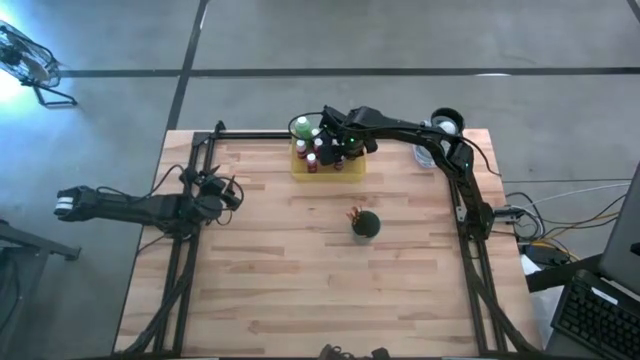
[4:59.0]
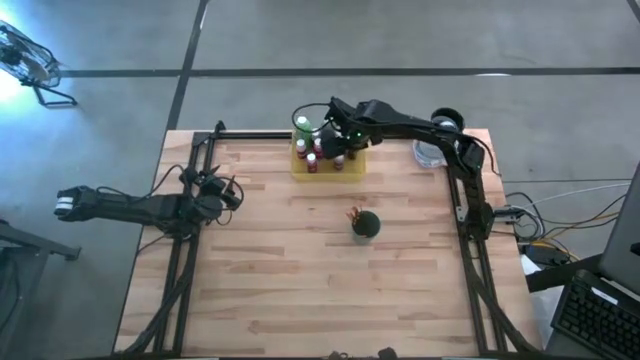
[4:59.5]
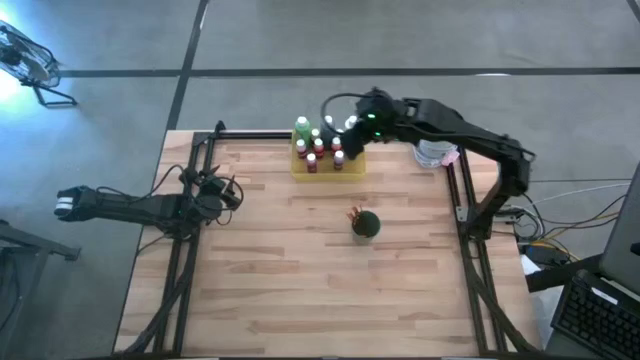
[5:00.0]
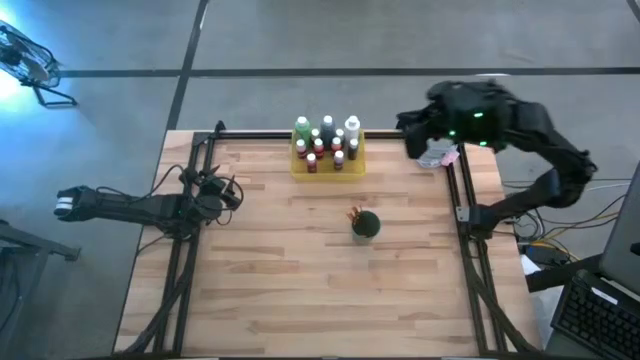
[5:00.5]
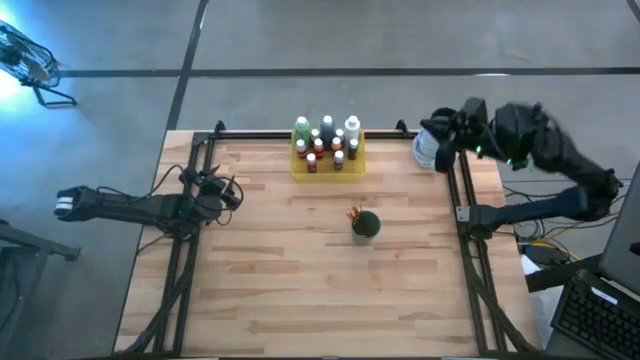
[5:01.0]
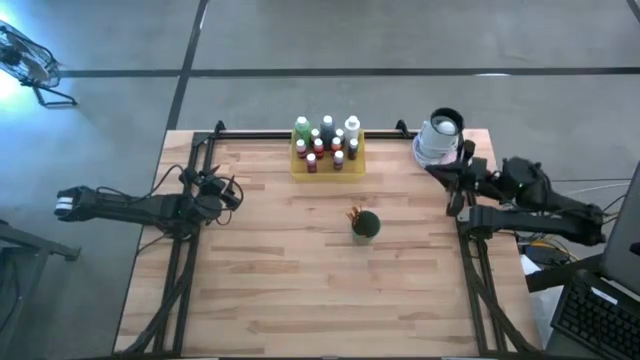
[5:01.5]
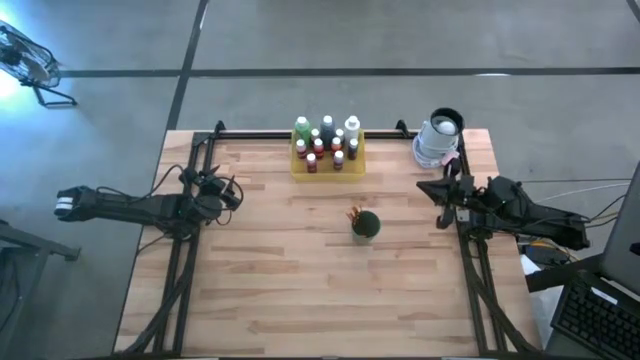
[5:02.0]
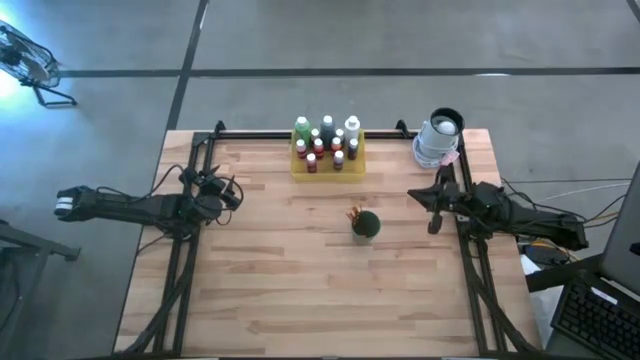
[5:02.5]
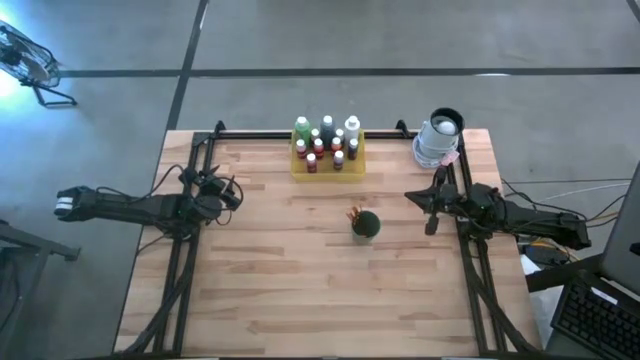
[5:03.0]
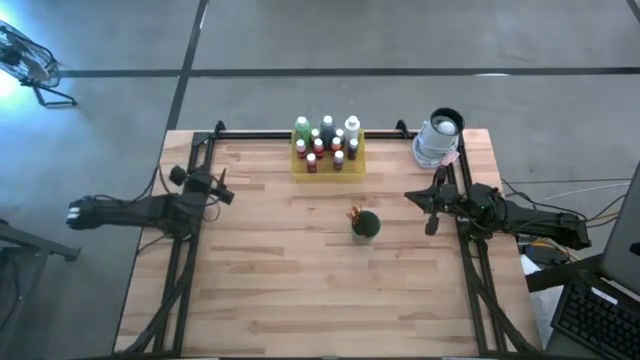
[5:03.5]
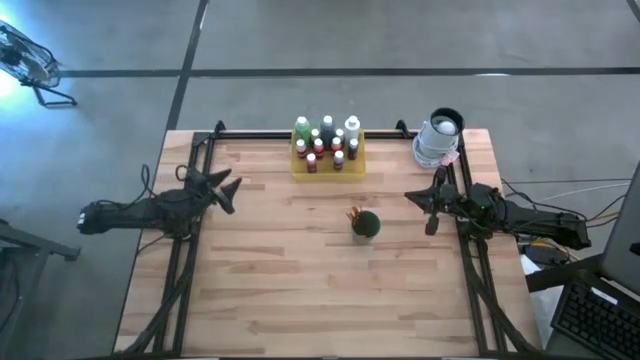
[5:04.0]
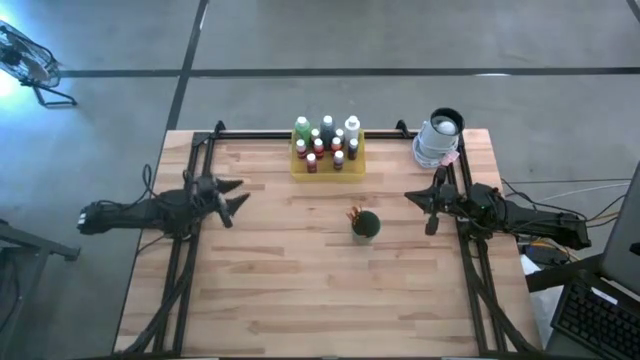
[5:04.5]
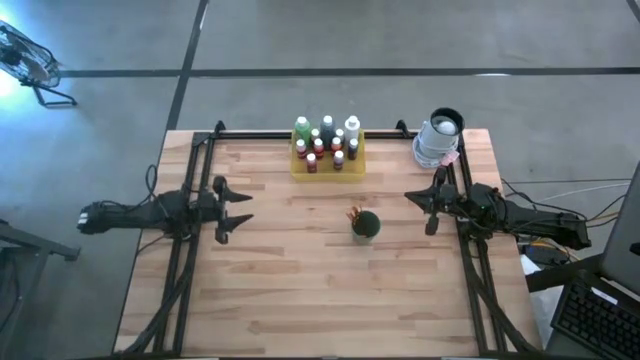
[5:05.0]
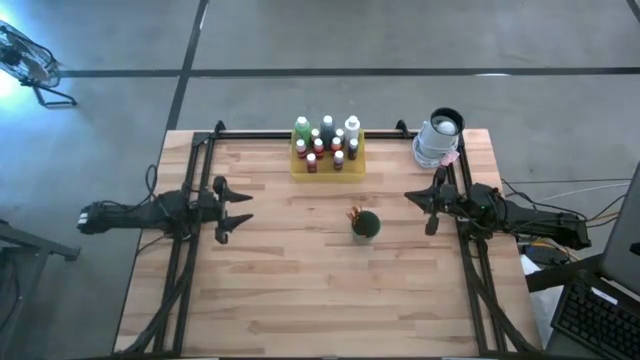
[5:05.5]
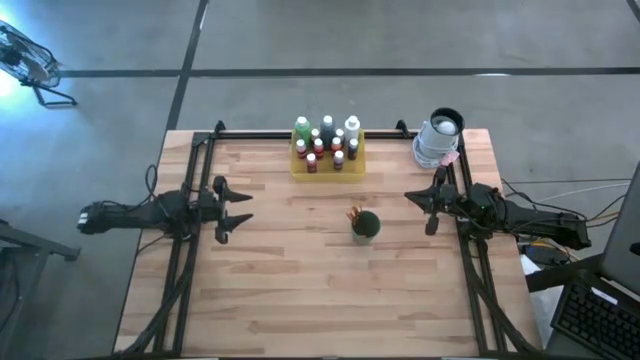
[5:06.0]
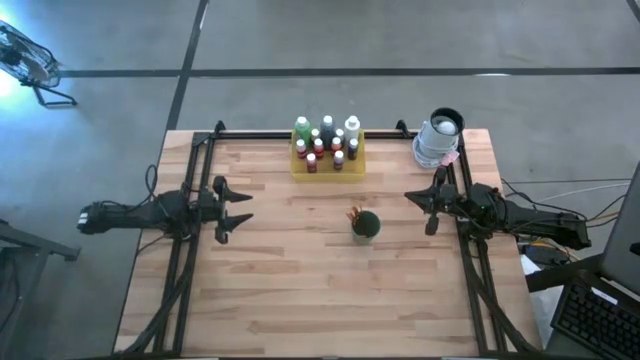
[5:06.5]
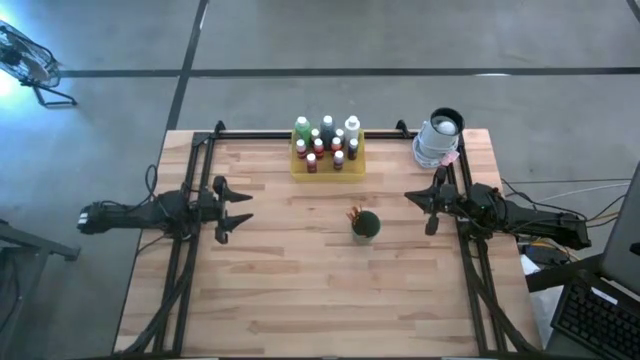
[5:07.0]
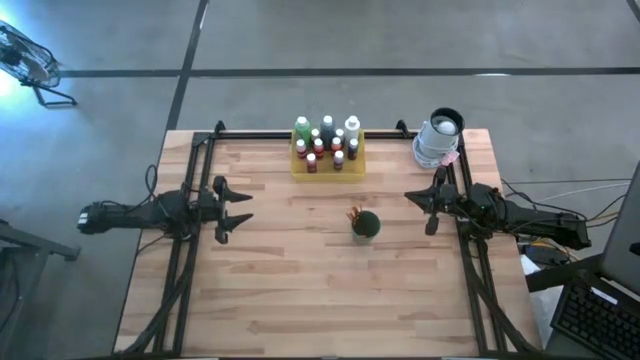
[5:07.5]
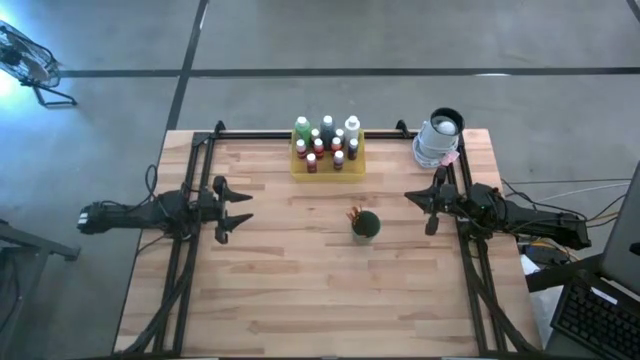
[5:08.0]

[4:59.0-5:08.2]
Task: Pick & Place Paint Supplies
Return to Home Position

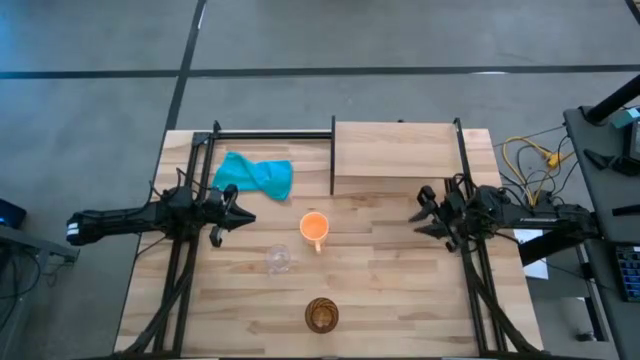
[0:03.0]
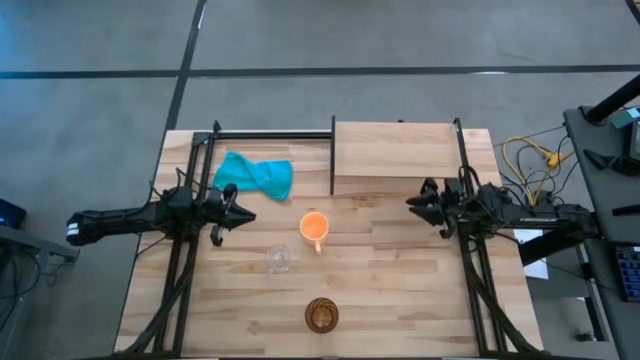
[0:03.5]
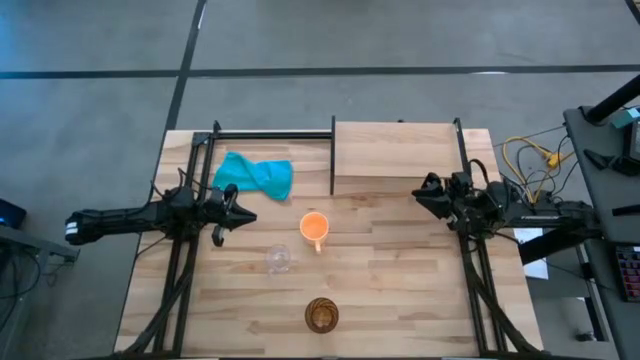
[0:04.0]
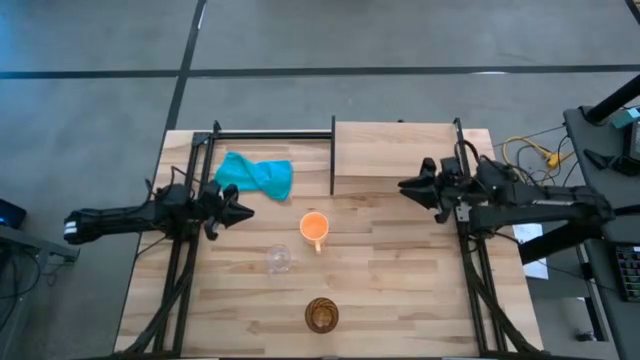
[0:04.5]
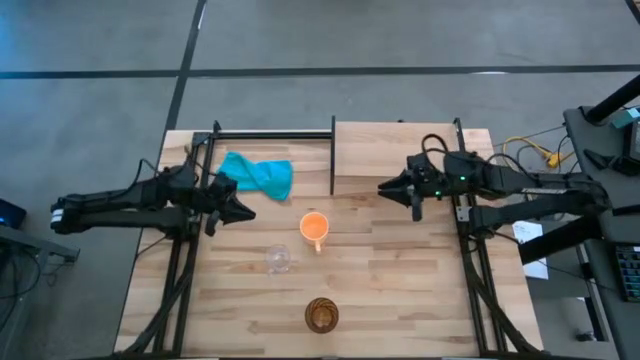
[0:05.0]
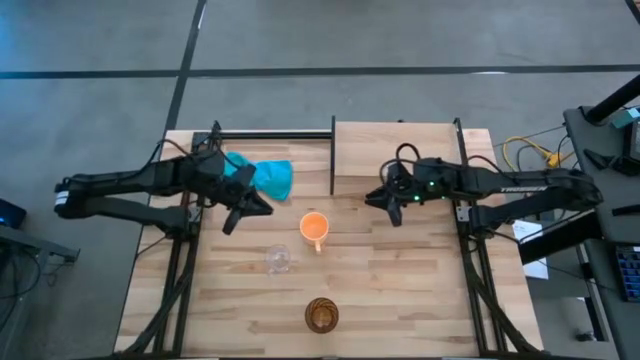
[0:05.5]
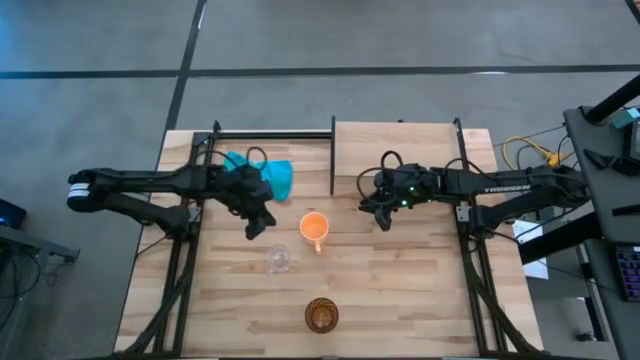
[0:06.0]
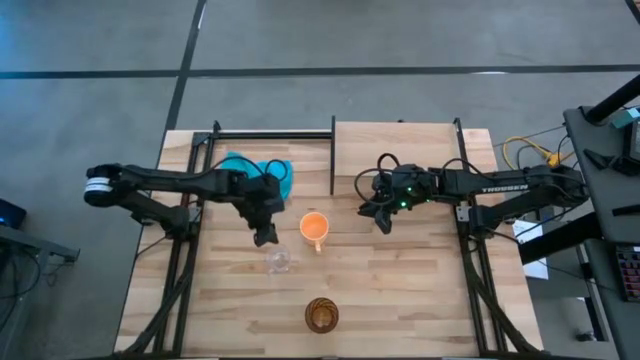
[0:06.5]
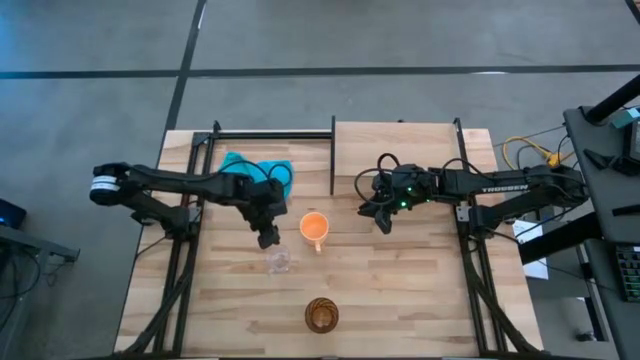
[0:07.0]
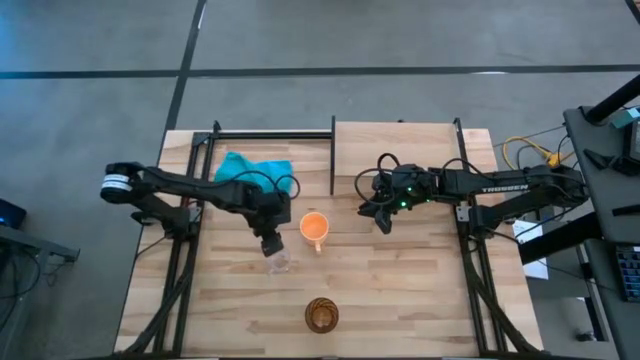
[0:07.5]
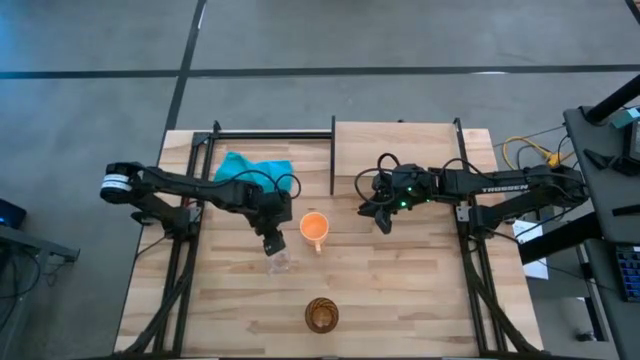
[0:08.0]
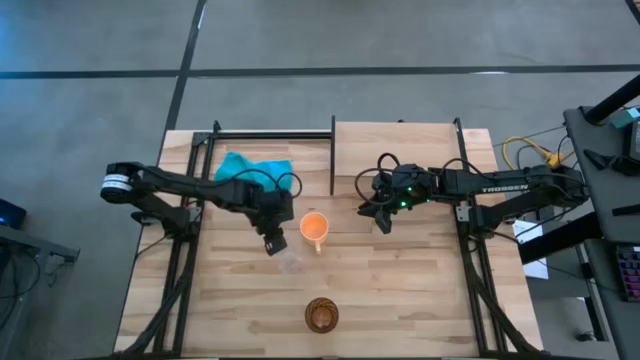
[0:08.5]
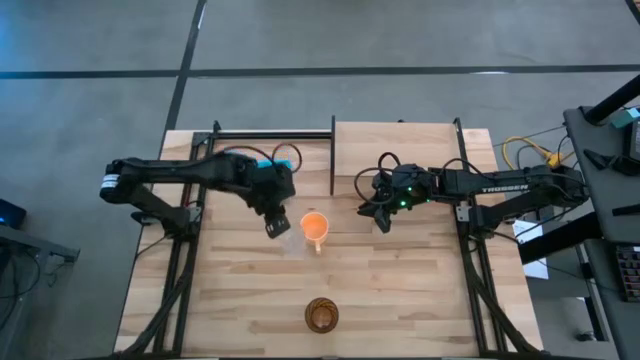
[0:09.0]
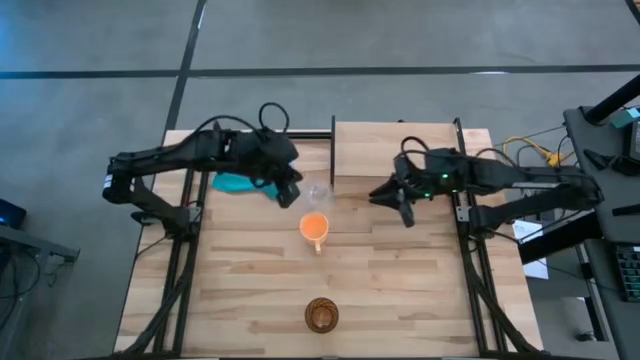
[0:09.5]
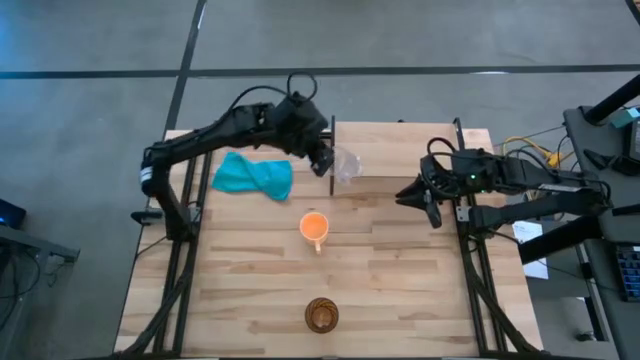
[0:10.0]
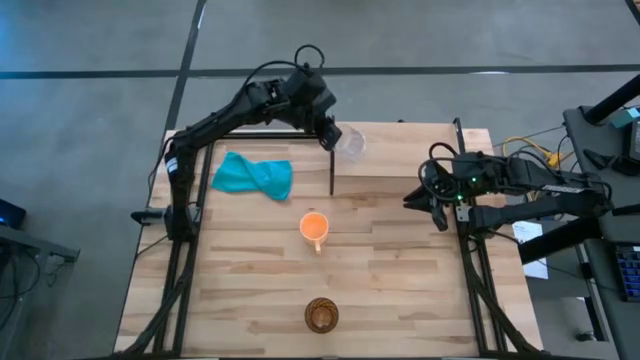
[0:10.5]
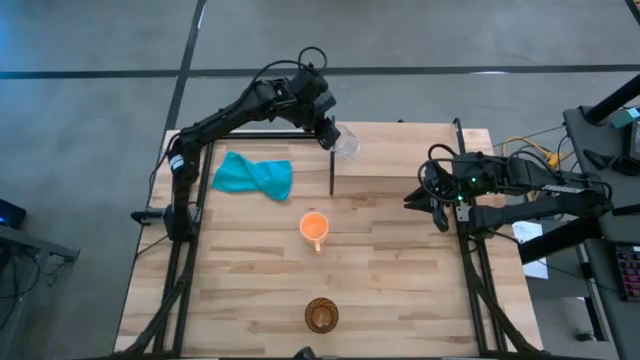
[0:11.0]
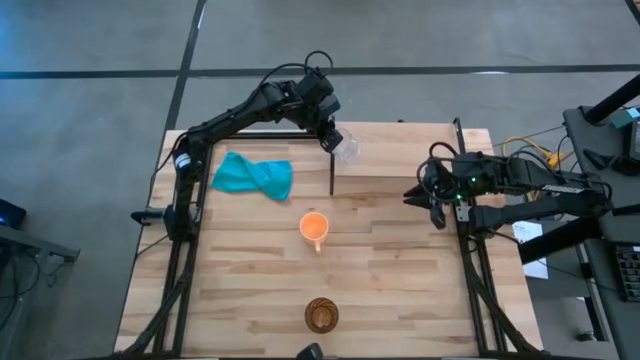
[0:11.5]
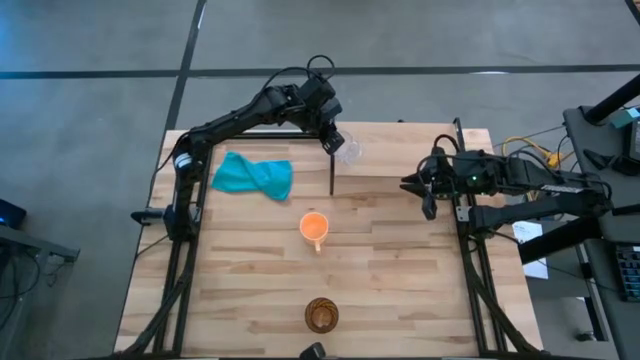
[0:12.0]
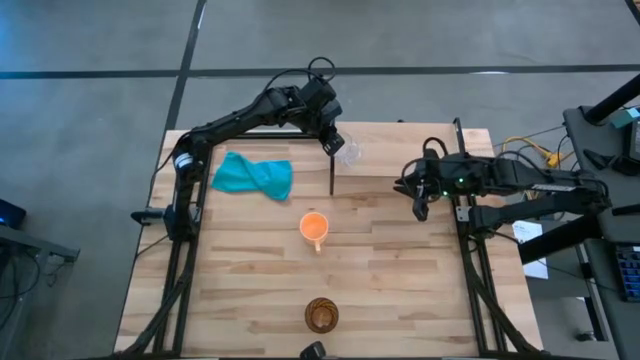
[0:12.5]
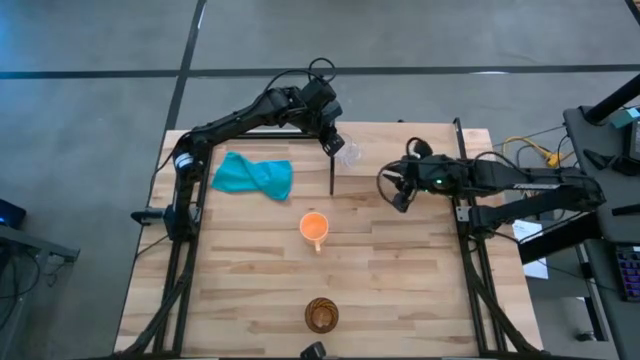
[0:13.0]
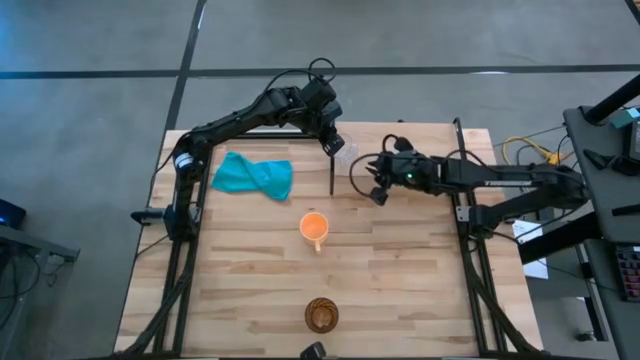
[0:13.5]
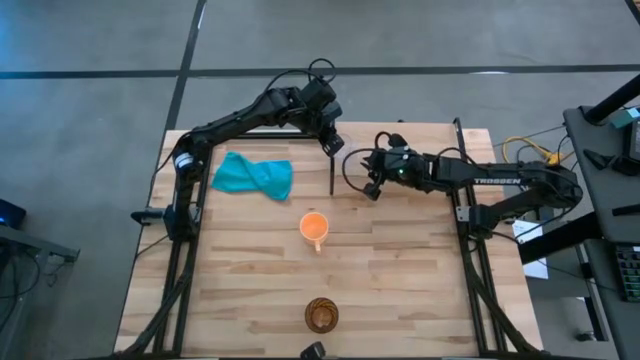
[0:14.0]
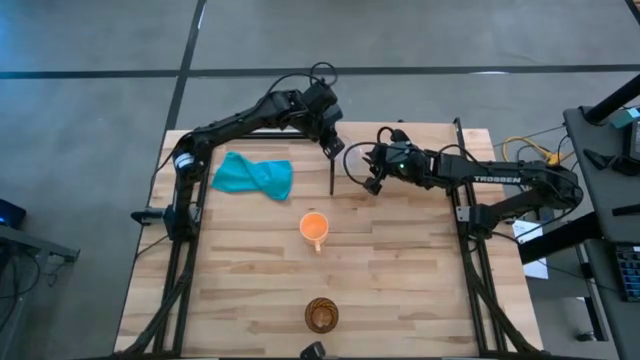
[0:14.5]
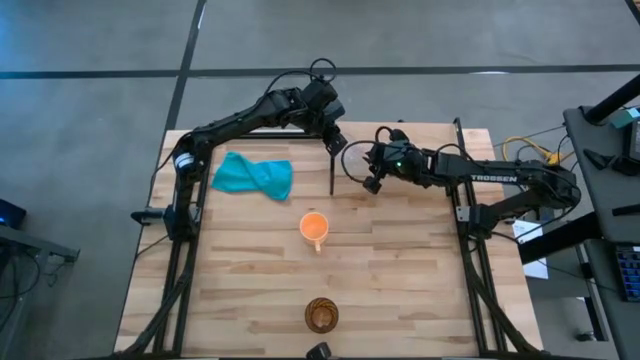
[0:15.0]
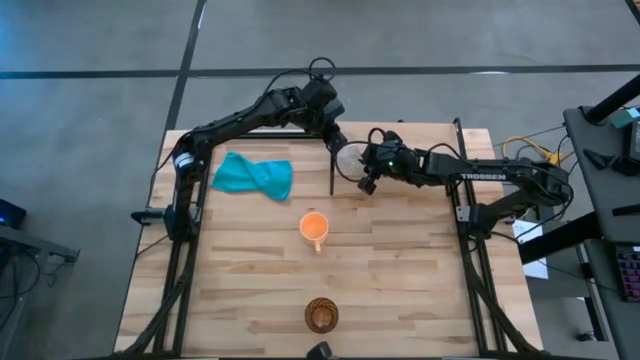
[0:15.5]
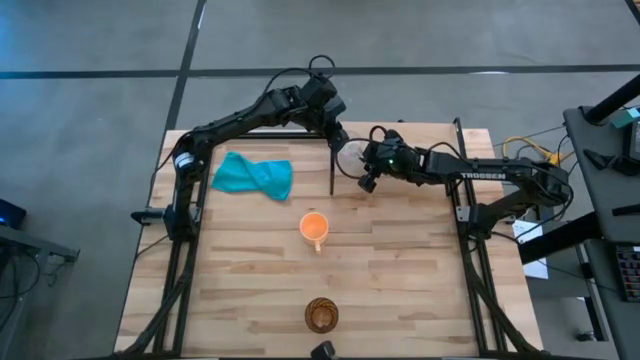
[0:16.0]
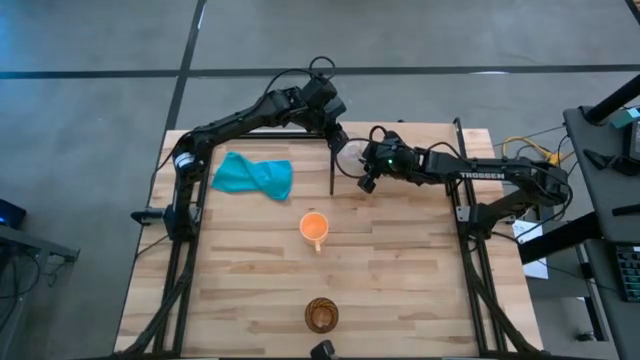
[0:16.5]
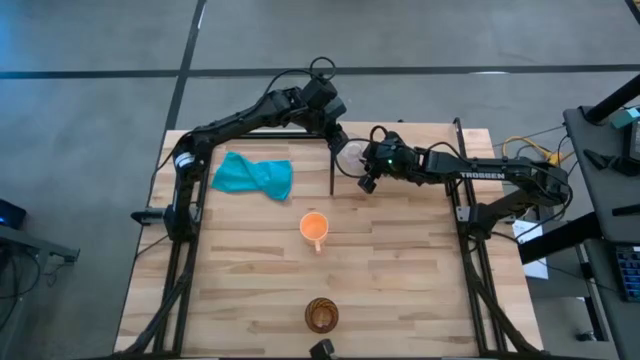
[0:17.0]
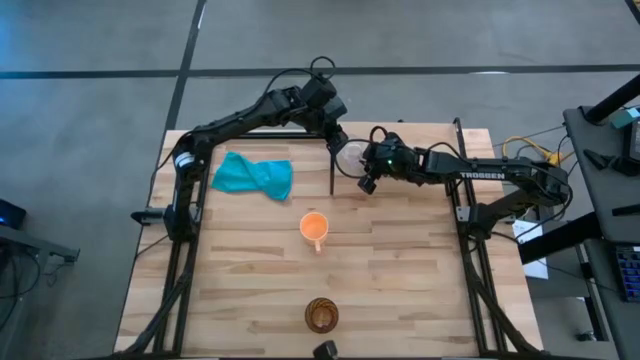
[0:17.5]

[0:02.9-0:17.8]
Task: Stack small to large cups/mugs on shelf
Put the transparent mug on the shelf
